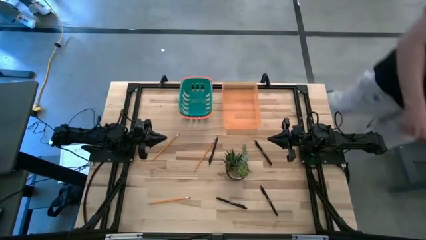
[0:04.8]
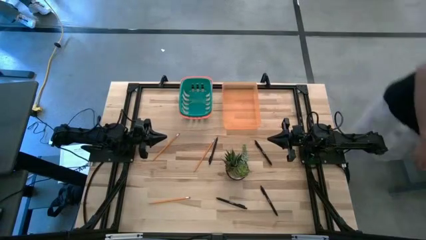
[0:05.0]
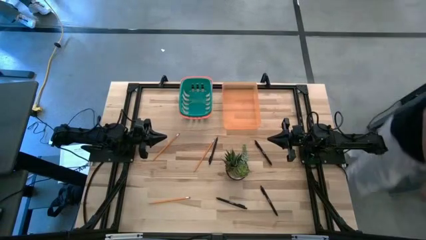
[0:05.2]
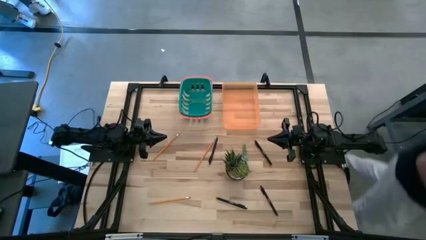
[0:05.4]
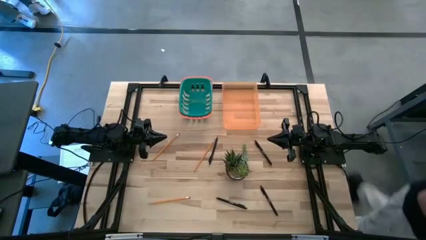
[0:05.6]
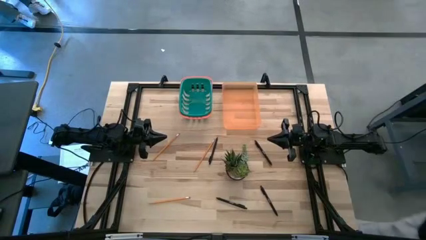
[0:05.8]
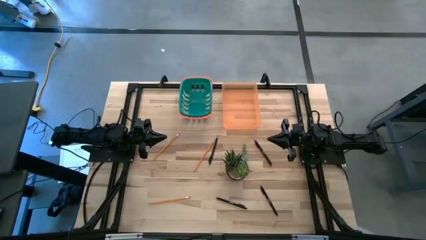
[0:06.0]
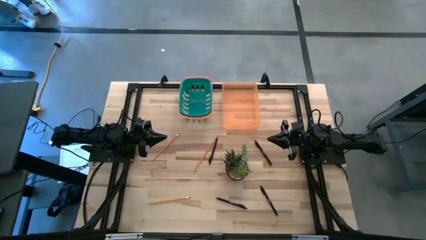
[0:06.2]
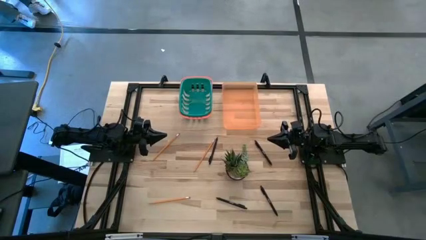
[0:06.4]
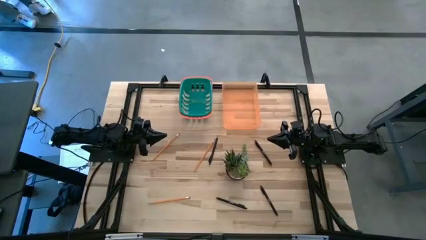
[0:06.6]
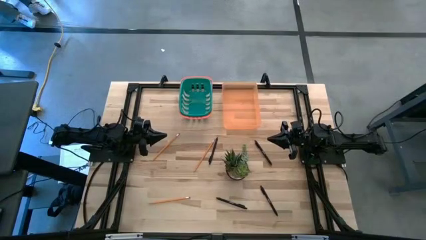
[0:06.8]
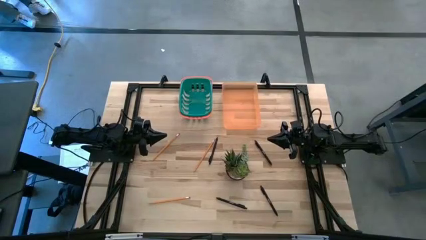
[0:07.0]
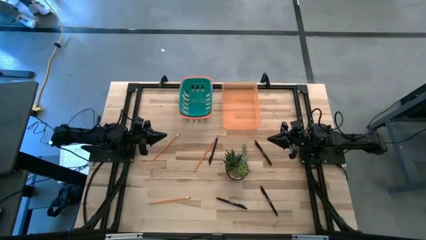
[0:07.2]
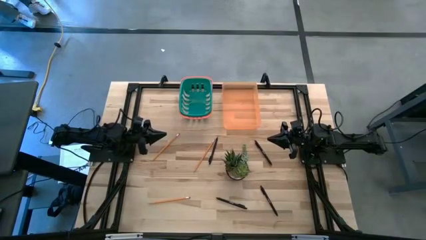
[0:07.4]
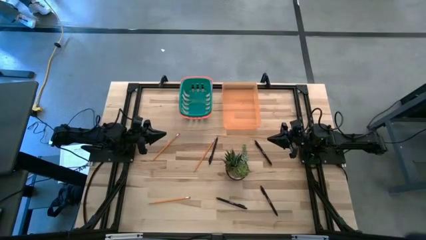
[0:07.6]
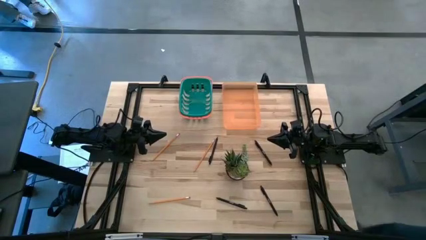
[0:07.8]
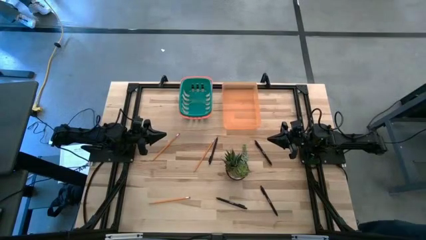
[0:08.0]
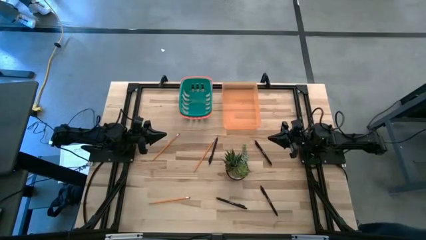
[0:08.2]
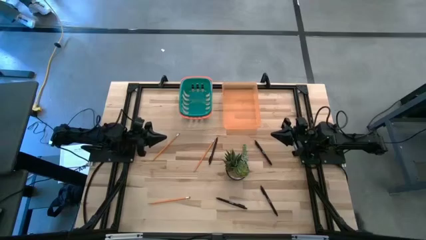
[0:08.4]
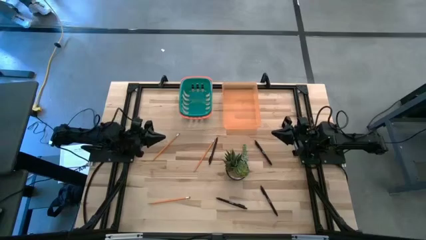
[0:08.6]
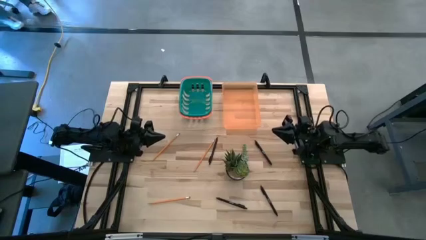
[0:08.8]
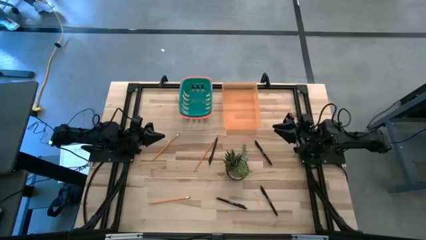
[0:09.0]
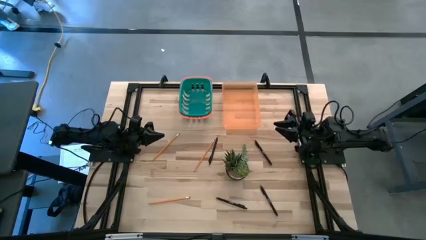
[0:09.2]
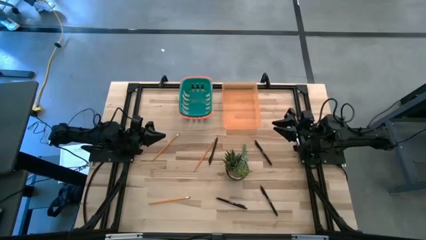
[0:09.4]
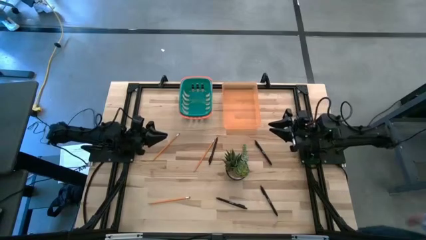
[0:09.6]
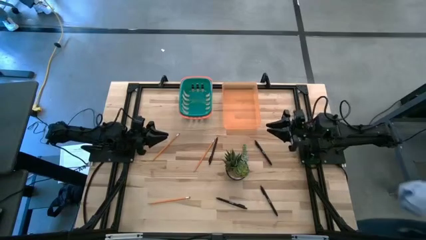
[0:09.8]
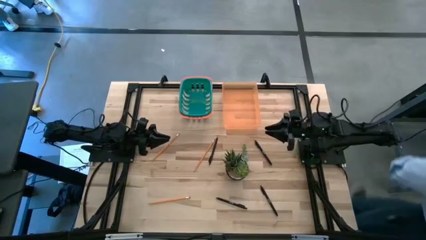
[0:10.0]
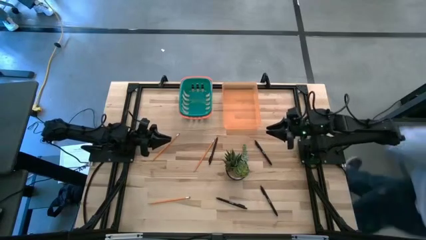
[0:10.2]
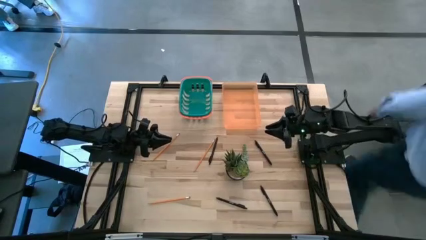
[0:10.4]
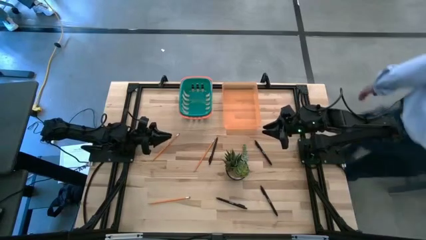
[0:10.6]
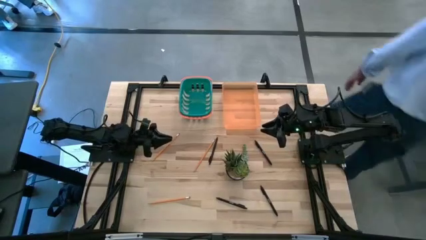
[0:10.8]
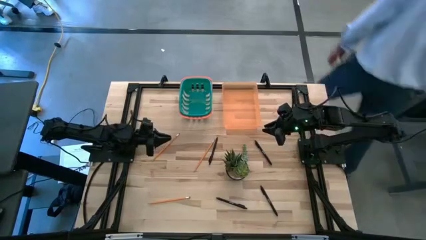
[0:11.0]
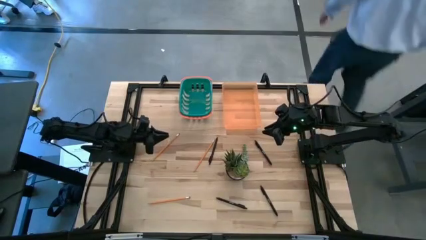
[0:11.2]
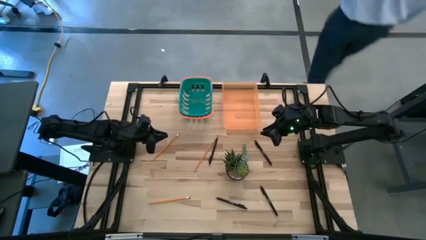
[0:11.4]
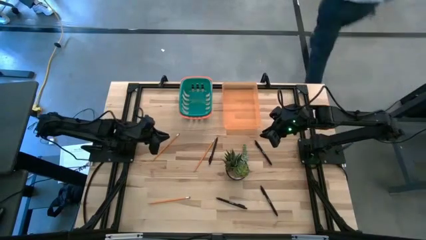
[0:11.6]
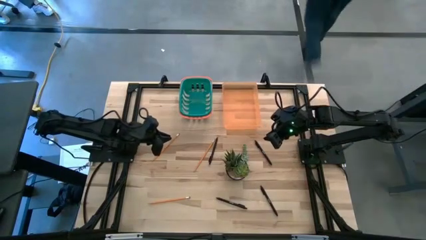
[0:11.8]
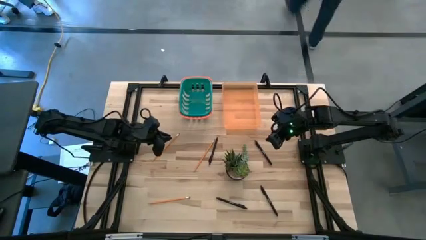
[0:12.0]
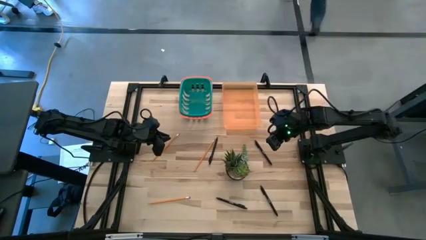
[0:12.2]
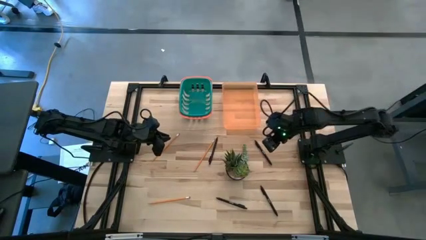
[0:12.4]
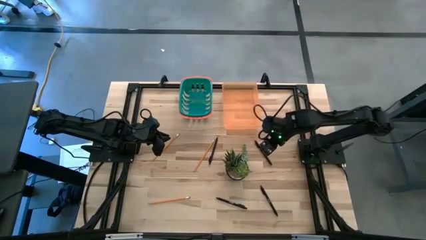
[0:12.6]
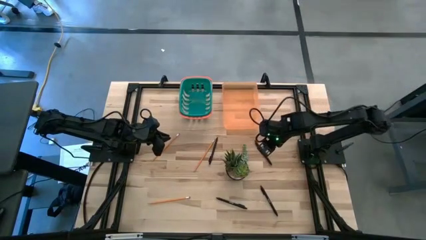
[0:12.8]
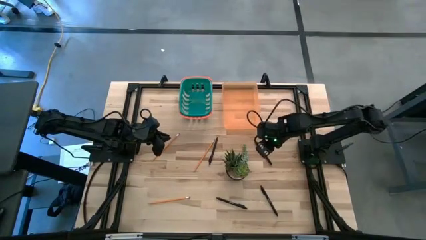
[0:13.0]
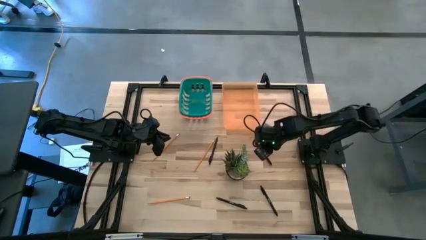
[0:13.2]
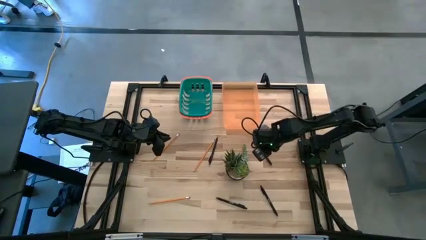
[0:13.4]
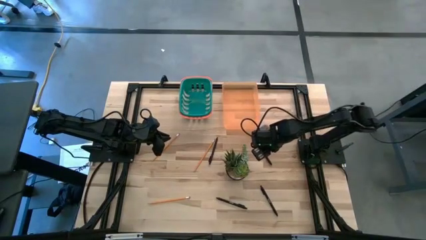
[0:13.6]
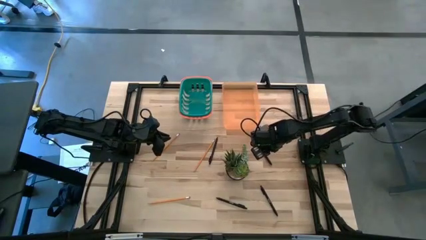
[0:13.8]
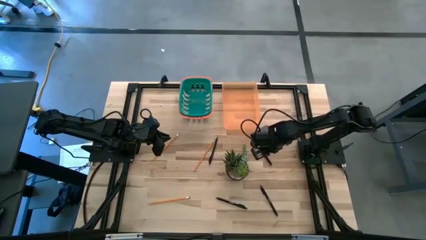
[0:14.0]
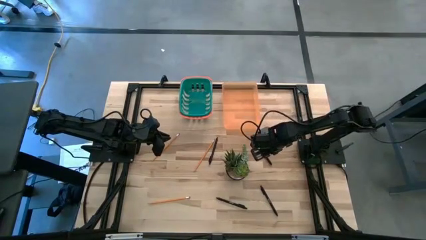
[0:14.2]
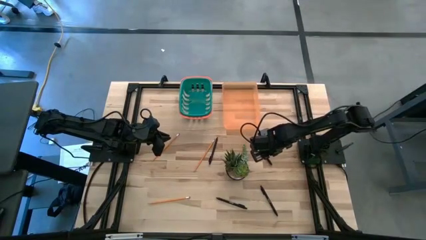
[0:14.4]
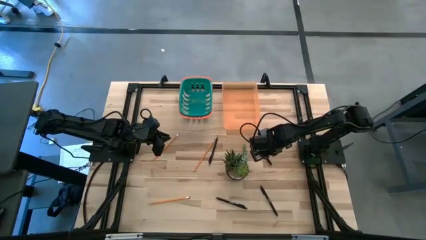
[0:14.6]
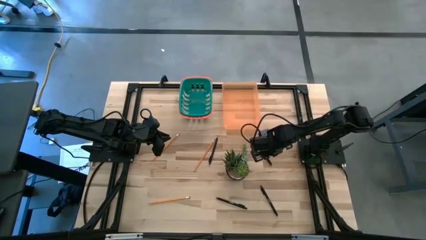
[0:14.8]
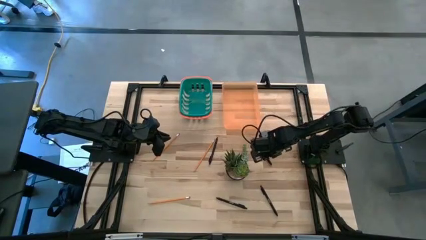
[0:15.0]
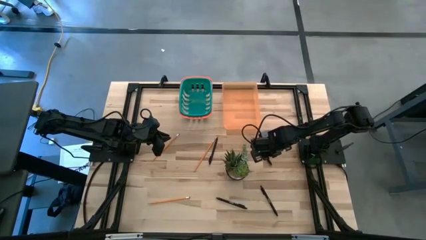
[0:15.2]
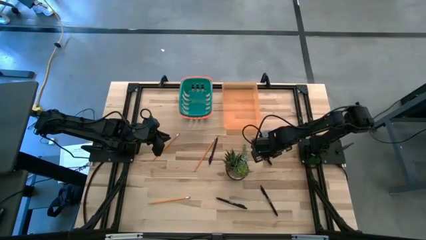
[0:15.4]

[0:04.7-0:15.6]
Task: Sort pens & pencils
Put the middle right black ballpoint pen into the orange bin
